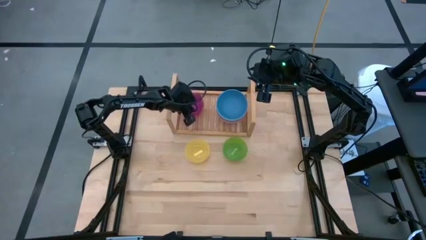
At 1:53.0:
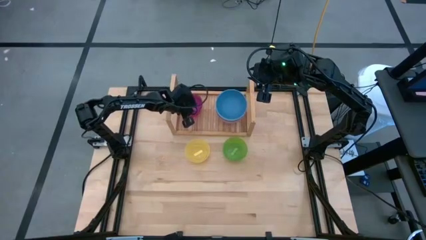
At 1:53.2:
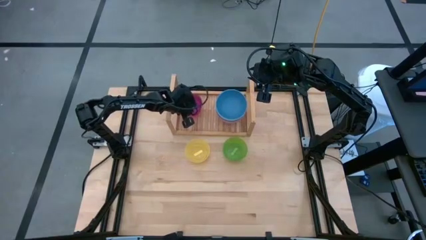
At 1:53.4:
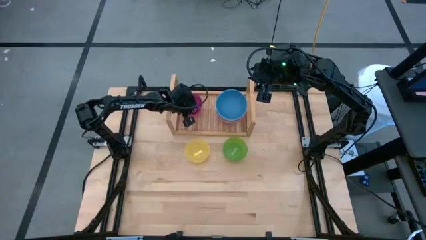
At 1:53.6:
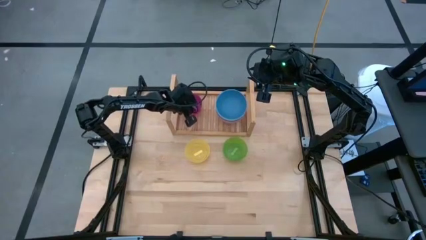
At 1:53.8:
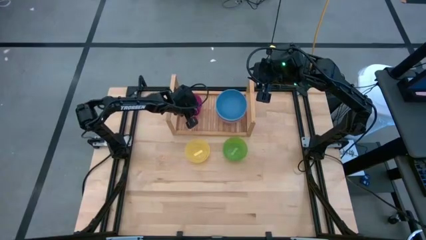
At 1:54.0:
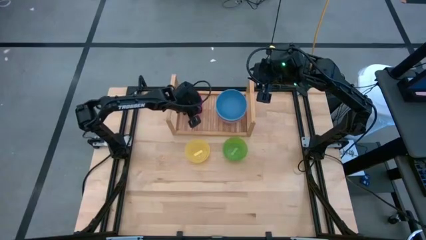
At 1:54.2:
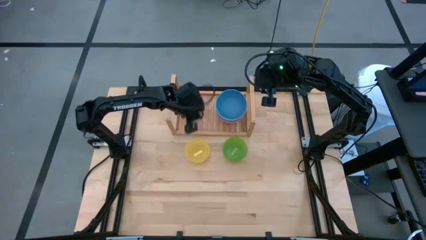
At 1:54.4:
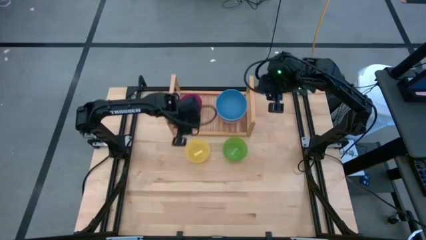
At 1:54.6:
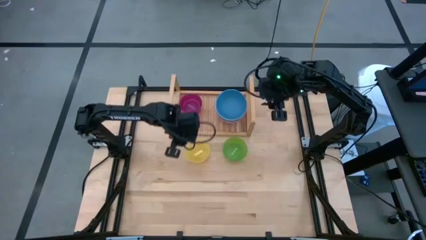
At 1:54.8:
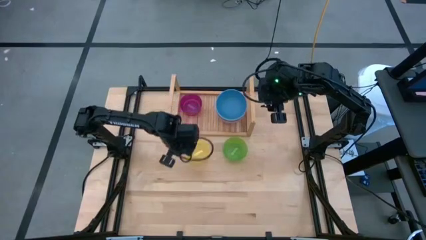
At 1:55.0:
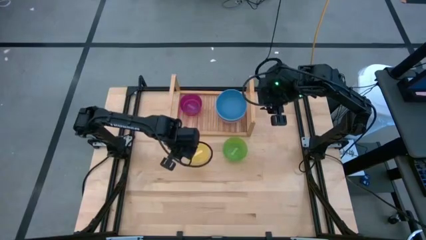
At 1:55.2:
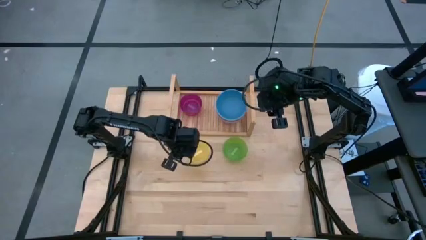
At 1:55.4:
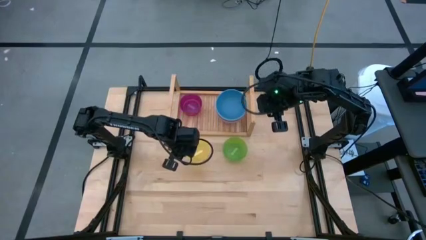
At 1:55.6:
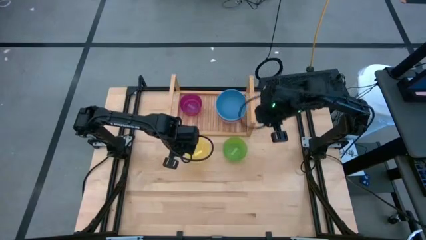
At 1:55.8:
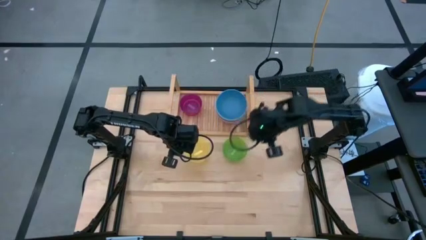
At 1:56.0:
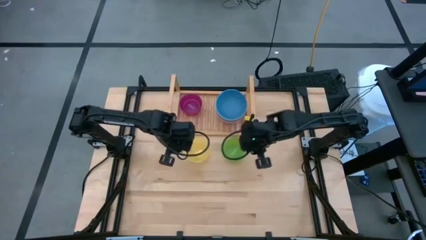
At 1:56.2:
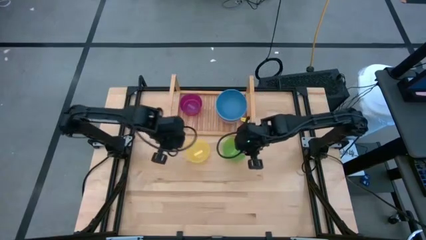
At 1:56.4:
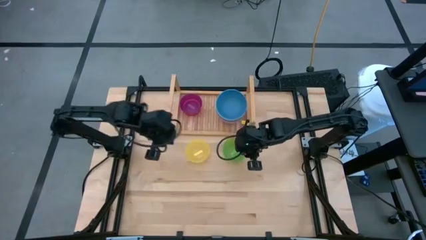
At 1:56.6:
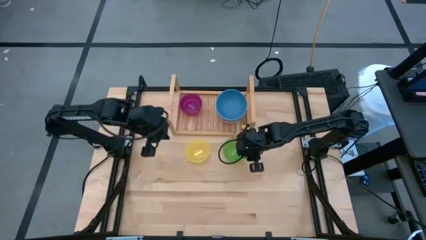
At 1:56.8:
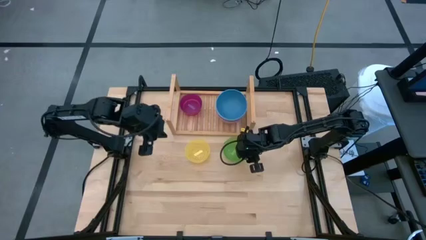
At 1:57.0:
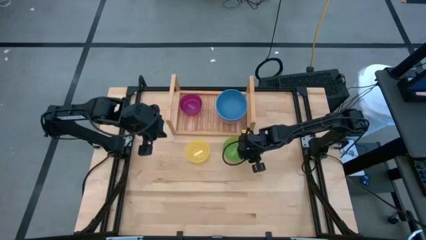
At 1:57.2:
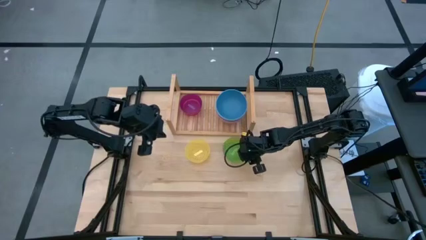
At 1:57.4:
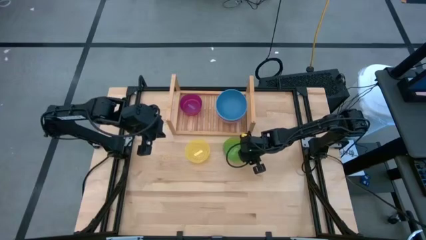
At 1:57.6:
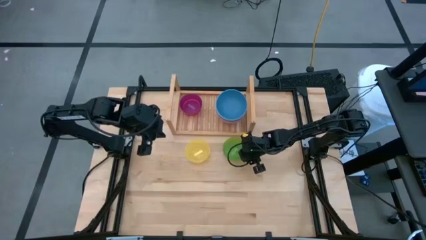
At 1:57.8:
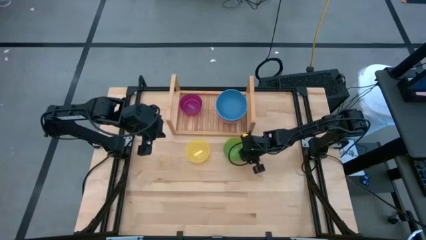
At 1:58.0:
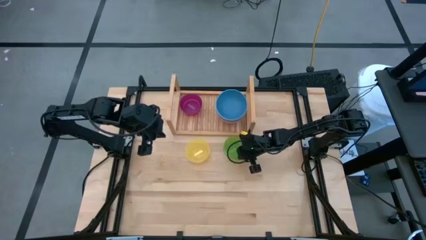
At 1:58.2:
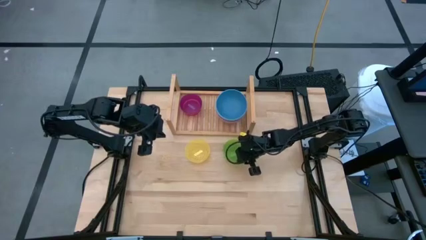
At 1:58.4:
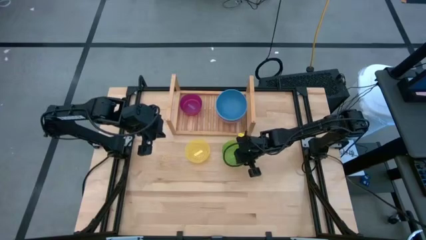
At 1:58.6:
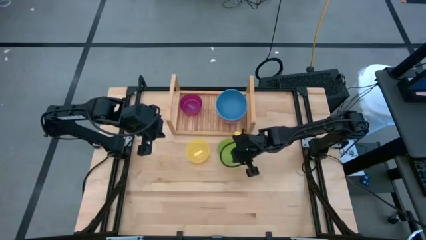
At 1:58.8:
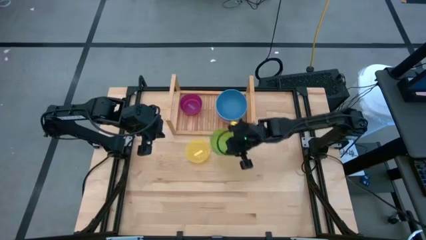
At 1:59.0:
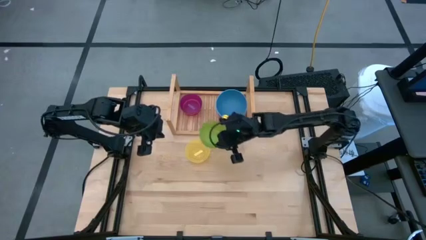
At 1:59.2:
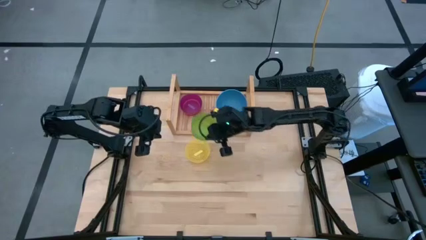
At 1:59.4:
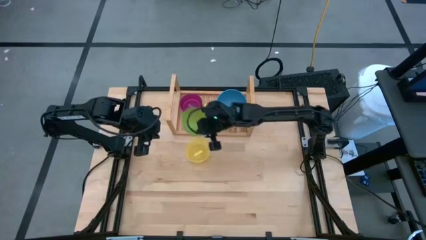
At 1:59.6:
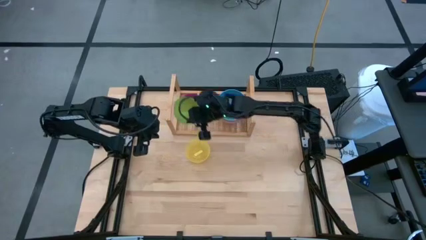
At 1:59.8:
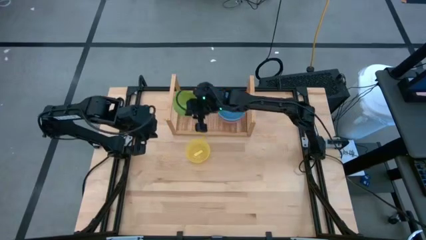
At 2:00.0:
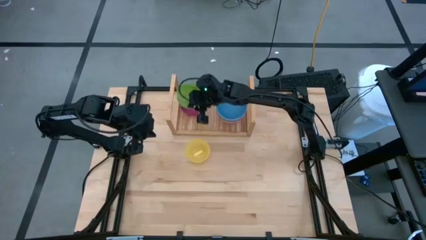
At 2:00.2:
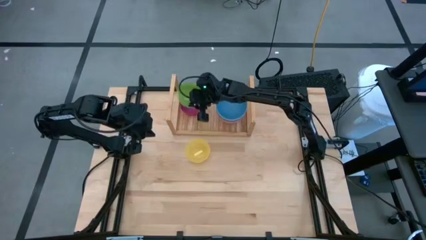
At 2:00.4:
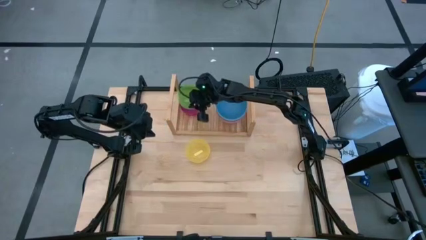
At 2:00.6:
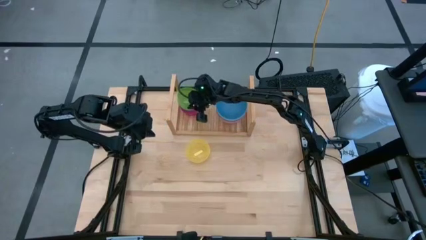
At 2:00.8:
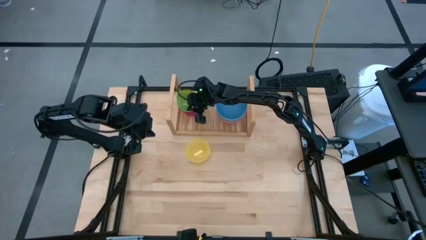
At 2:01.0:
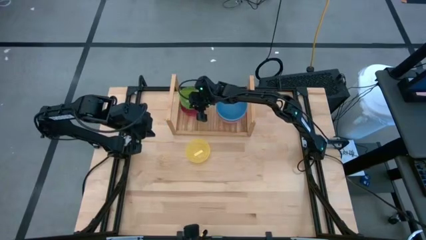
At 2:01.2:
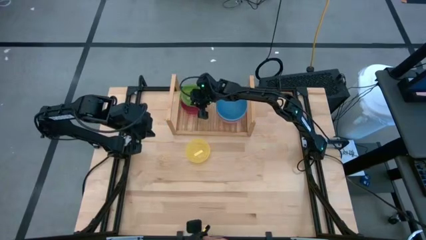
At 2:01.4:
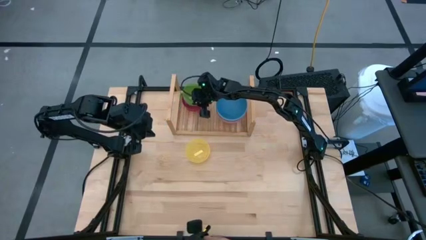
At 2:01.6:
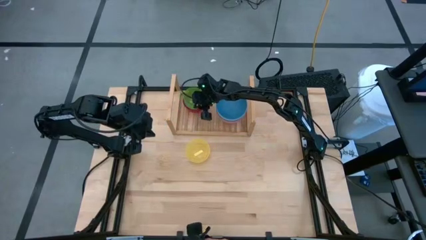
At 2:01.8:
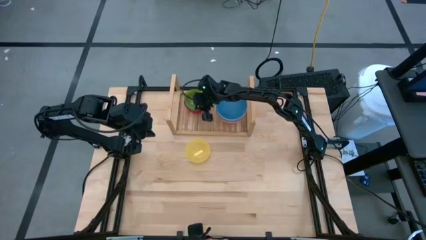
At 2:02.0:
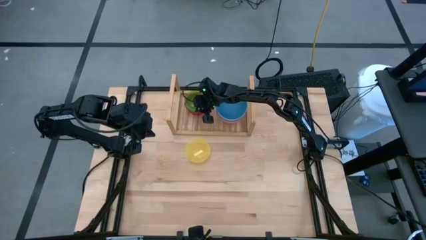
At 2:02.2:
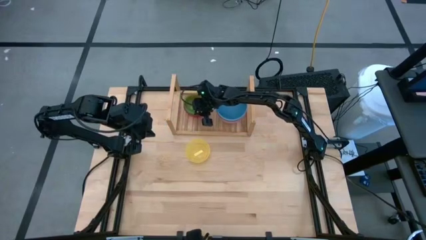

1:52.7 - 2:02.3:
Task: Place and stack bowls onto a shelf
Stack the green bowl into the violet bowl on the shelf

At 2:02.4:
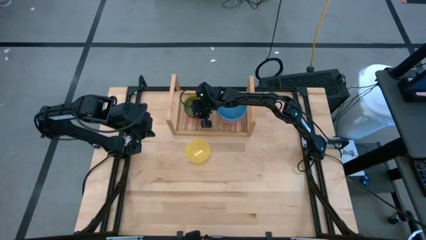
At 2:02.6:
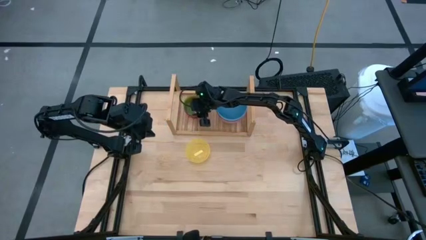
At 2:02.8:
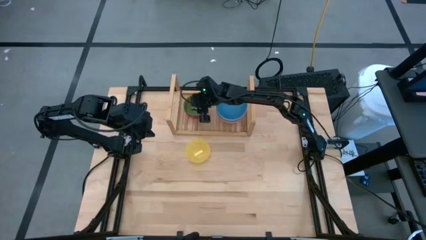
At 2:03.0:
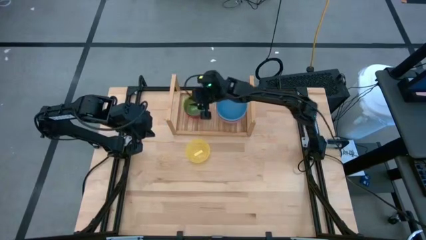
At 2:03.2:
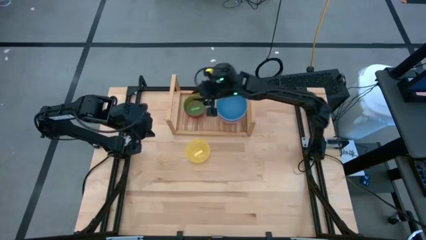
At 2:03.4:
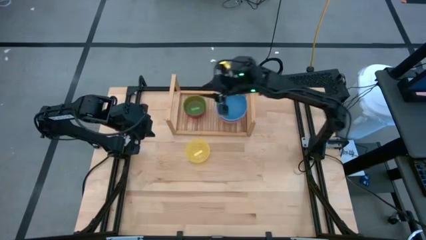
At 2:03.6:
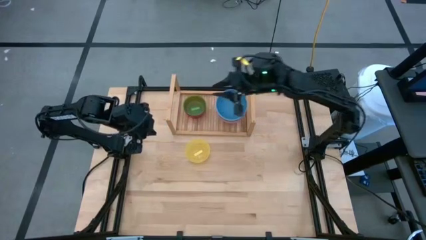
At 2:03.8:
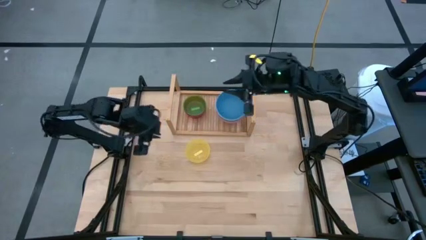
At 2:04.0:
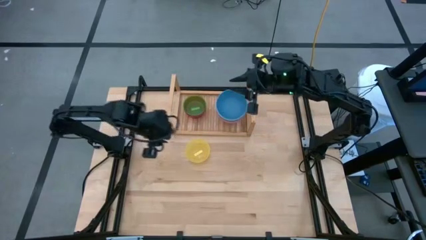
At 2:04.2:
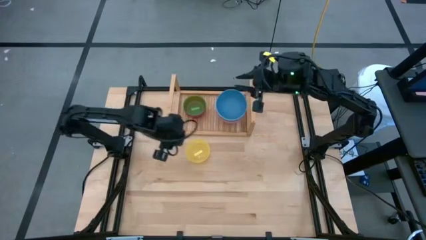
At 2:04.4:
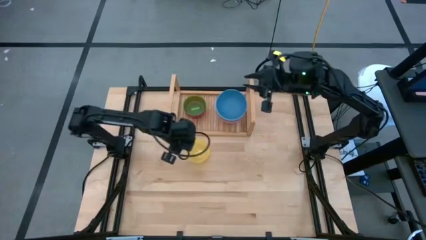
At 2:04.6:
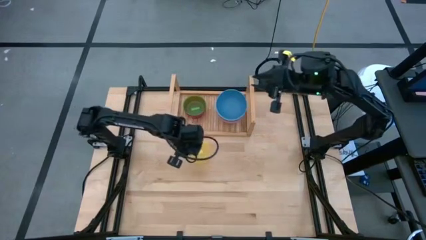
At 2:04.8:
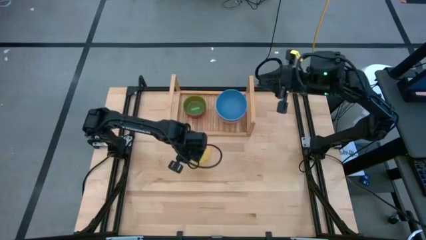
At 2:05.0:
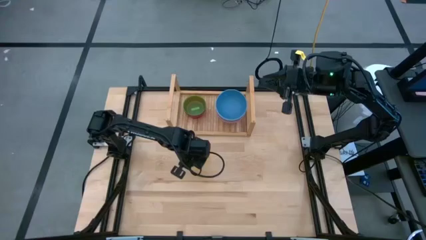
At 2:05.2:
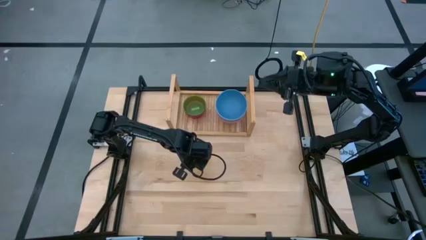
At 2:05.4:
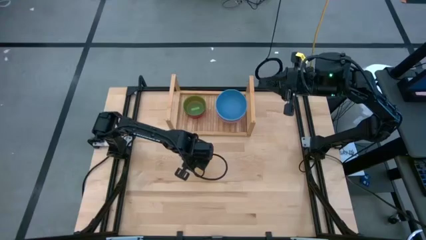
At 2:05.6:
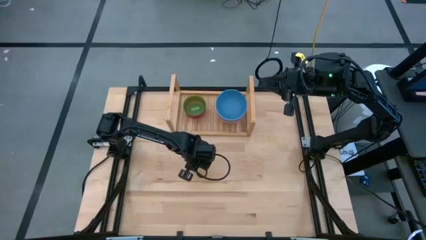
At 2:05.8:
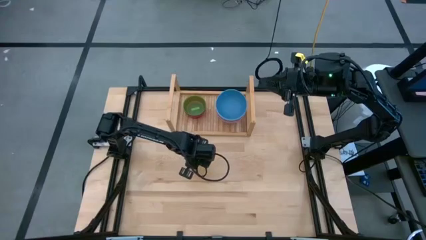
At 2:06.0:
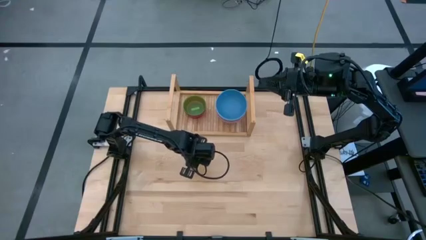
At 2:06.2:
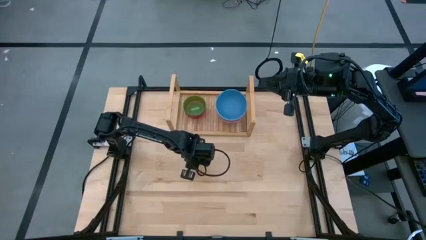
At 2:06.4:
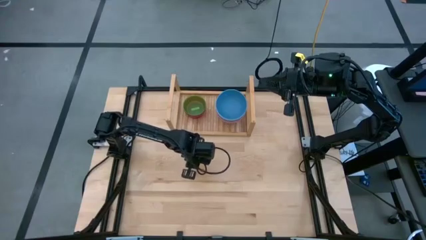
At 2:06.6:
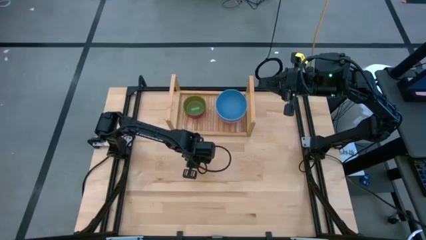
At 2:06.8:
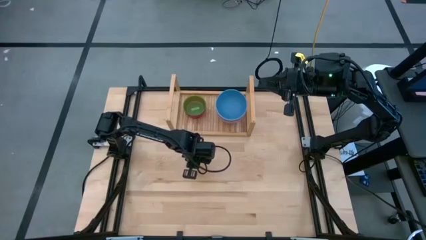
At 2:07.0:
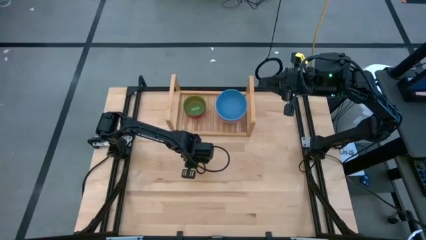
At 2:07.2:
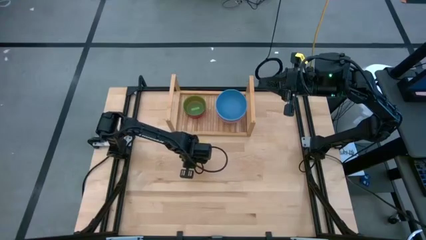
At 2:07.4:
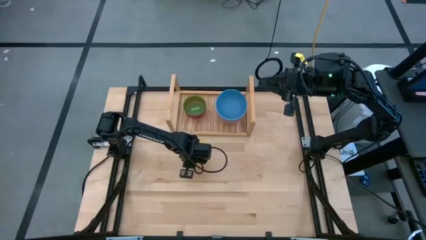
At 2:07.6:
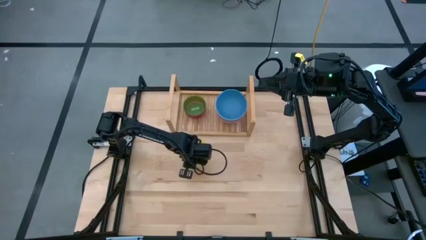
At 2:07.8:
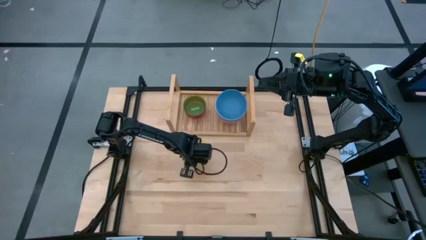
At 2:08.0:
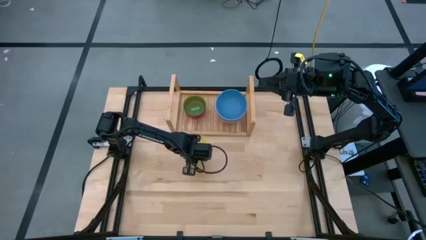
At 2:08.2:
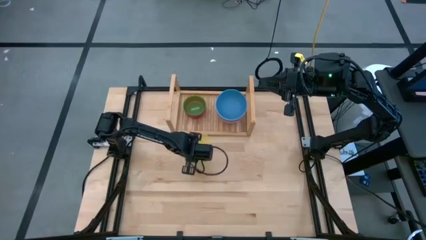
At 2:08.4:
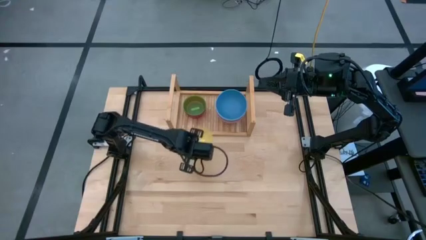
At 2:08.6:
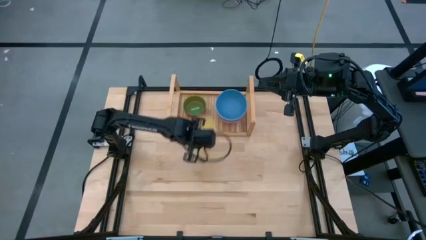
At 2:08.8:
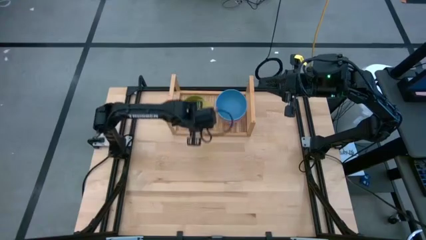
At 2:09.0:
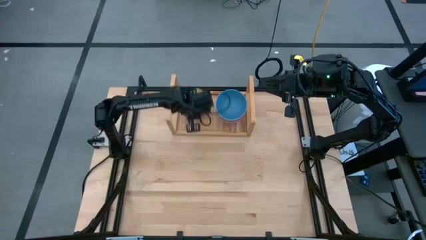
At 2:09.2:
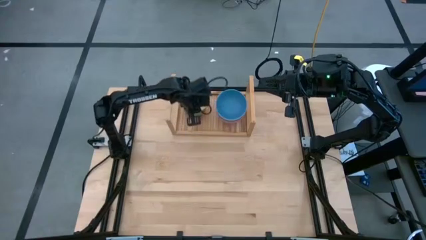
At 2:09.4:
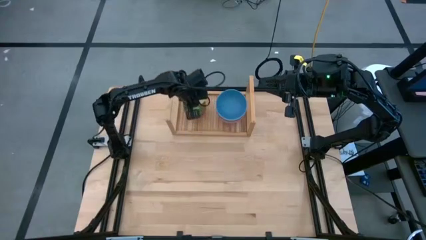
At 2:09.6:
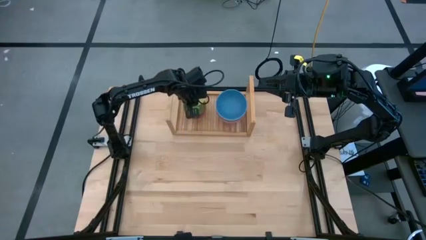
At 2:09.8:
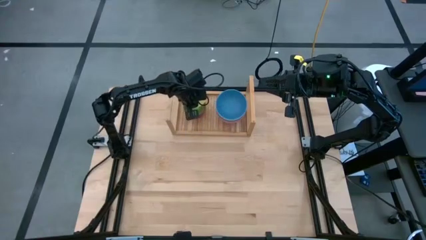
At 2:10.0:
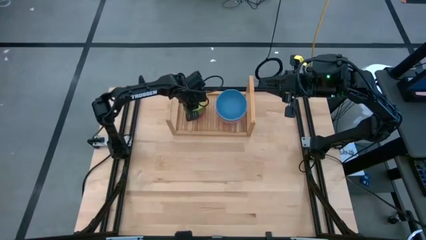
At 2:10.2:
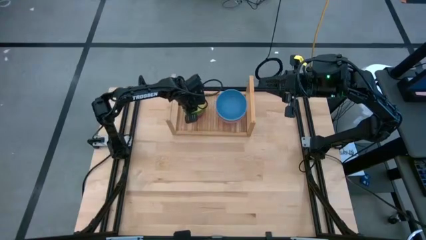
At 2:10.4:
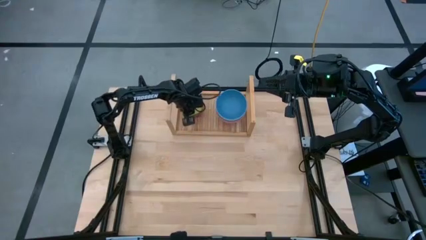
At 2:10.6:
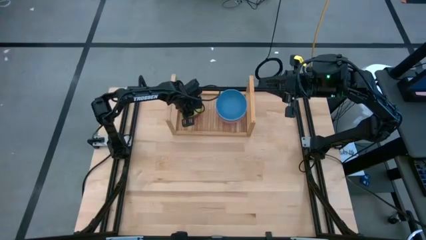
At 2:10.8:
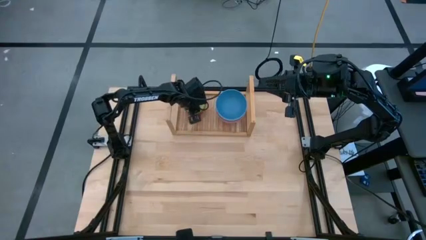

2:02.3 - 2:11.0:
Stack the yellow bowl into the green bowl on the shelf
